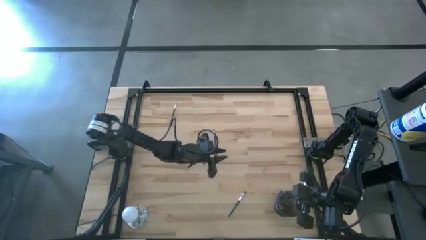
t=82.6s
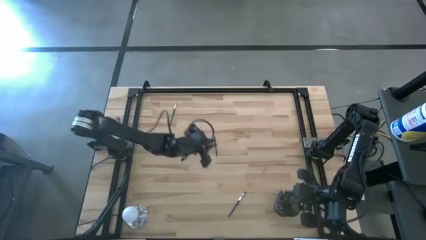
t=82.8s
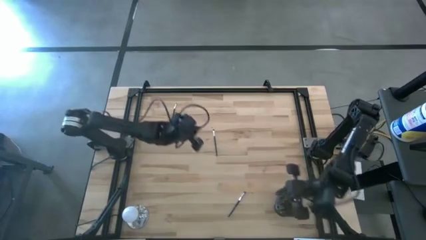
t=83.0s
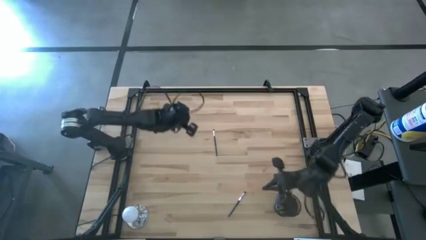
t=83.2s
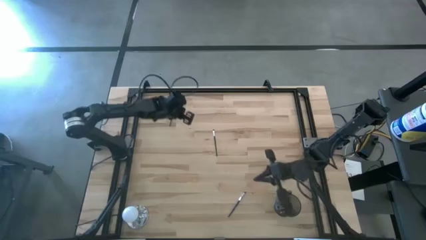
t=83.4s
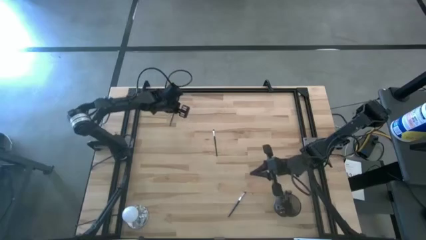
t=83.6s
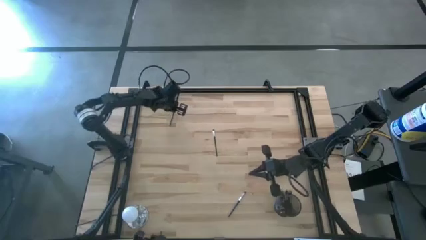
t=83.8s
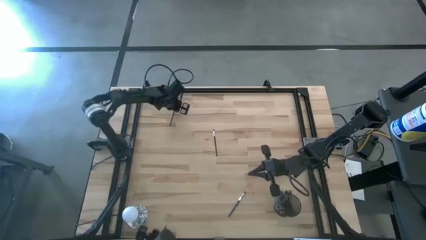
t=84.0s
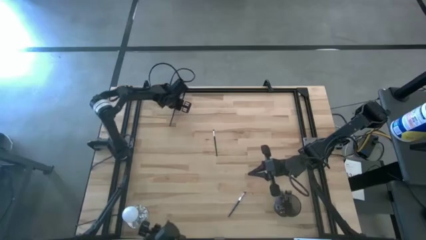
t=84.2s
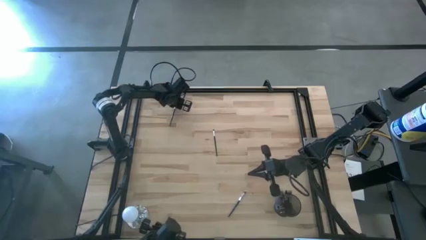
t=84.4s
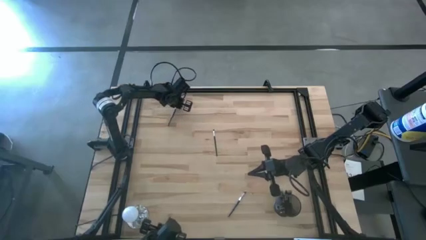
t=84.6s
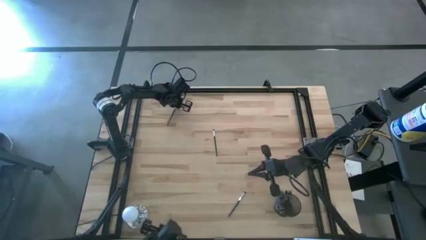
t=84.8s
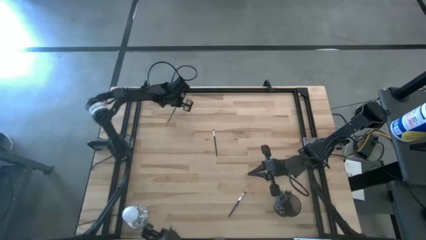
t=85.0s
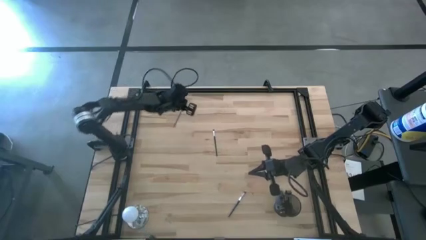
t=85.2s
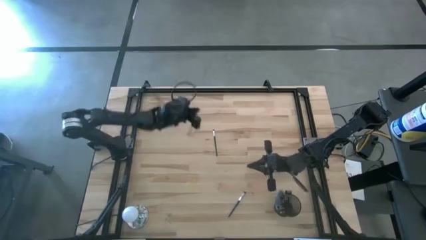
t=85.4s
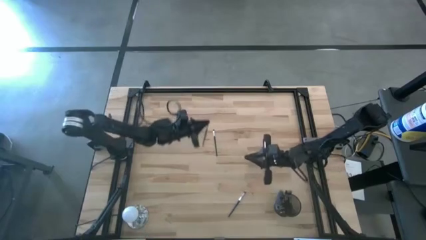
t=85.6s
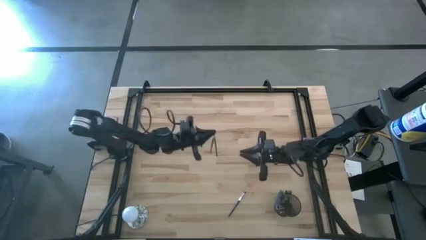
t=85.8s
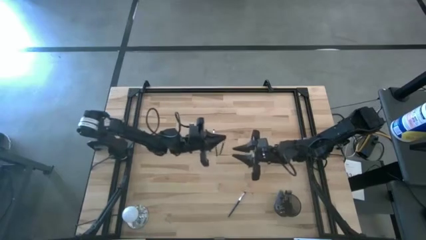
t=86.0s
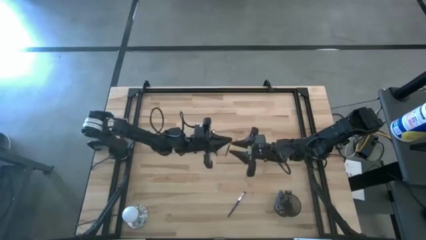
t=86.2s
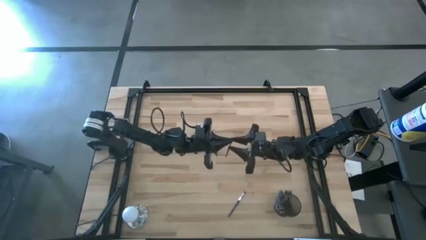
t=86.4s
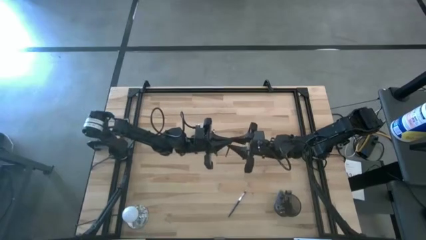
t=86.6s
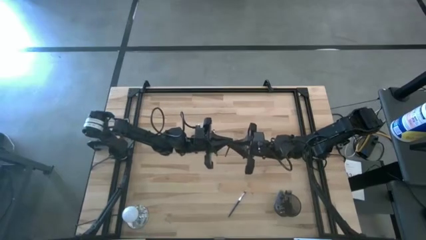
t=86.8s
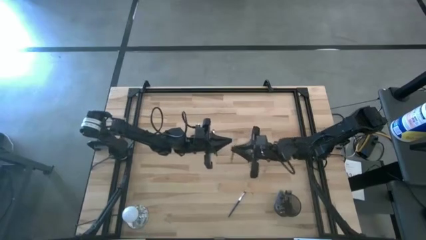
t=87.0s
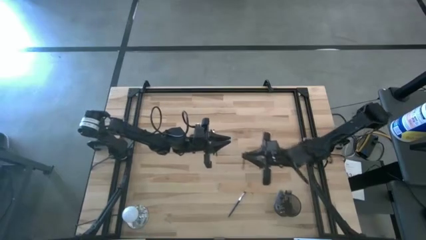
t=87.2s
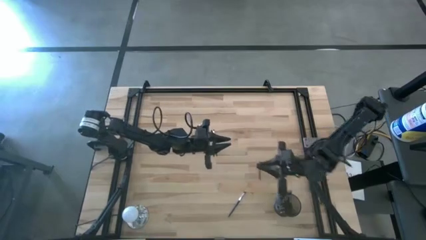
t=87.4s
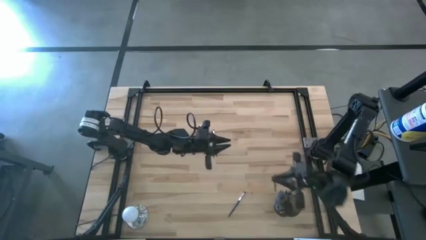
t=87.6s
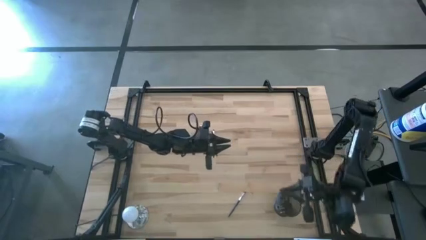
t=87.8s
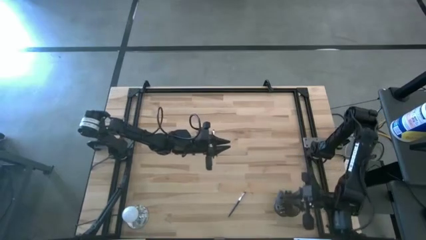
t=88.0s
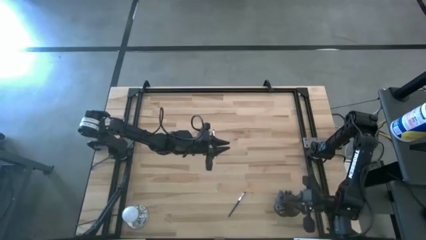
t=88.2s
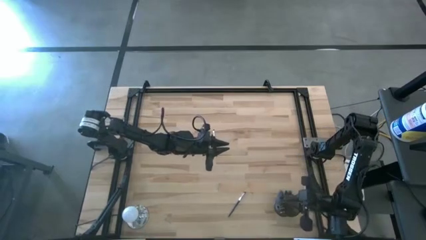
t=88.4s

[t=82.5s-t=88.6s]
Task: Sort items
Put the eyeshadow brush into the wire basket

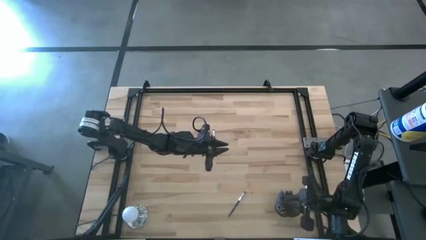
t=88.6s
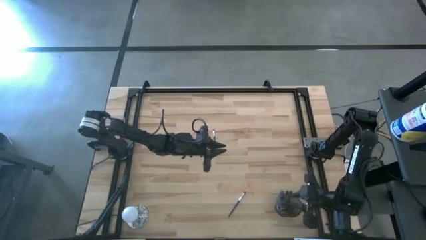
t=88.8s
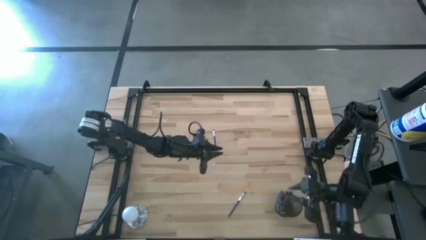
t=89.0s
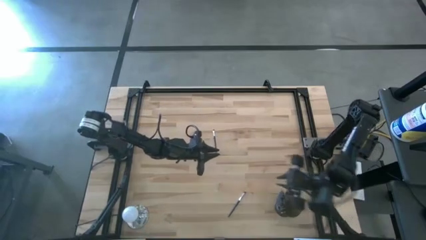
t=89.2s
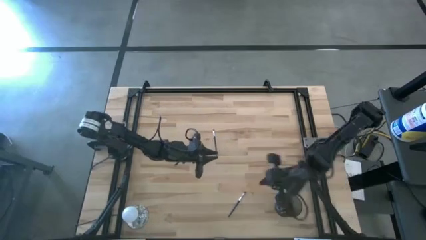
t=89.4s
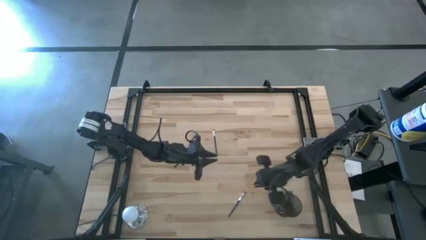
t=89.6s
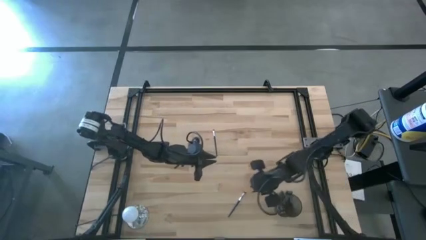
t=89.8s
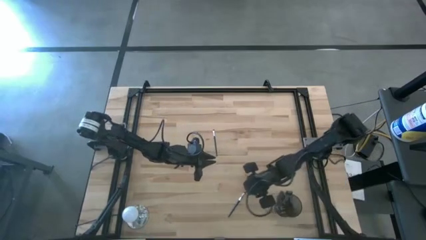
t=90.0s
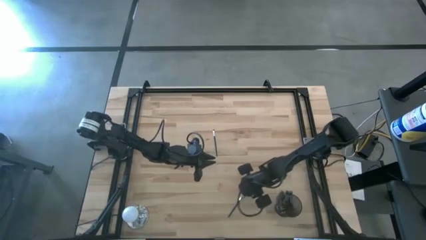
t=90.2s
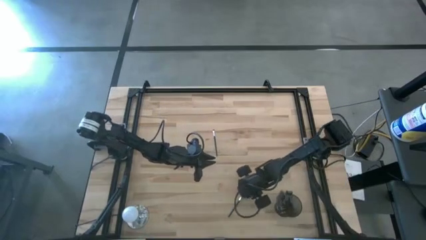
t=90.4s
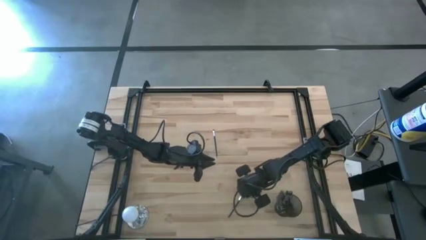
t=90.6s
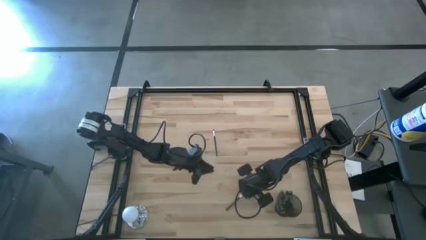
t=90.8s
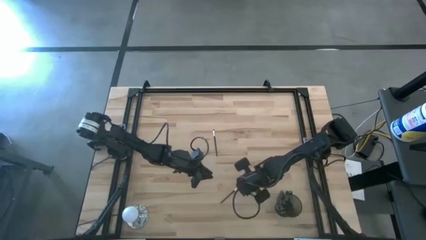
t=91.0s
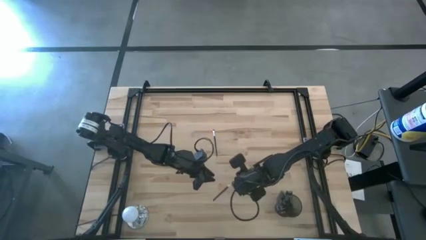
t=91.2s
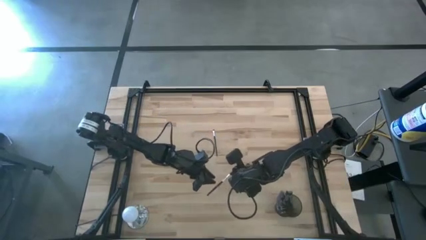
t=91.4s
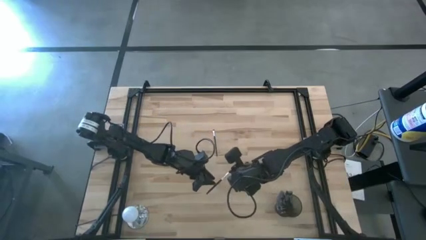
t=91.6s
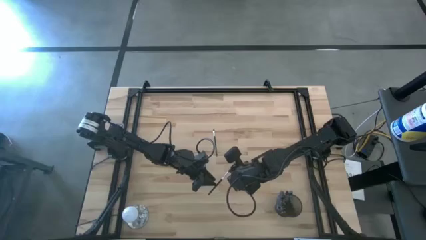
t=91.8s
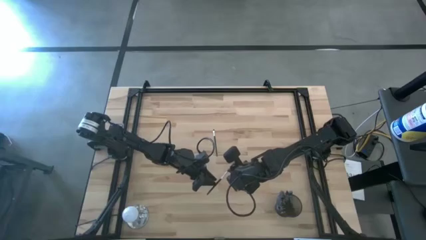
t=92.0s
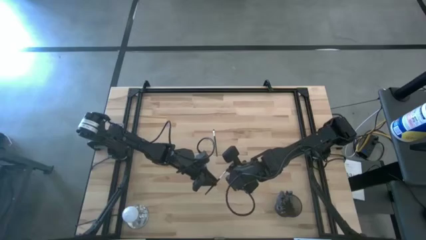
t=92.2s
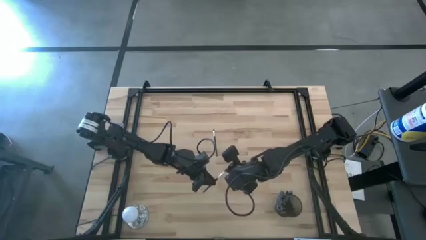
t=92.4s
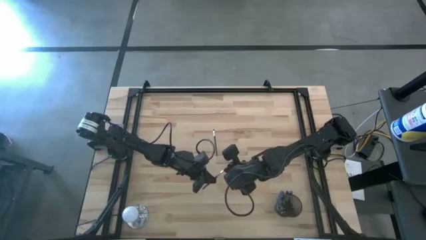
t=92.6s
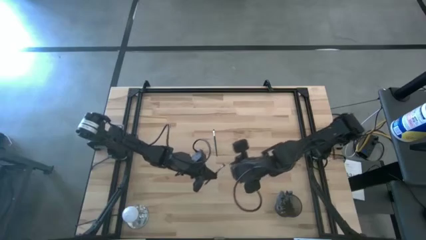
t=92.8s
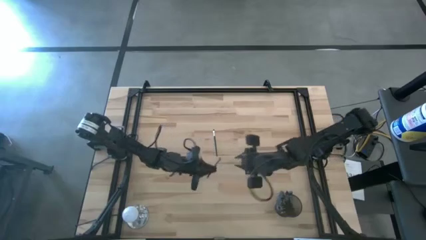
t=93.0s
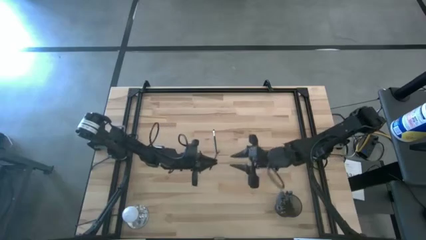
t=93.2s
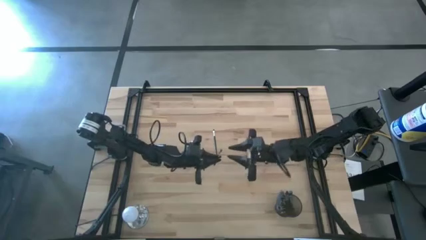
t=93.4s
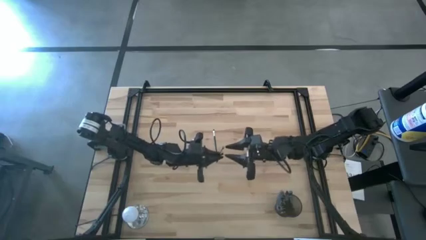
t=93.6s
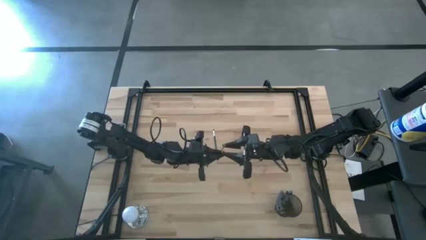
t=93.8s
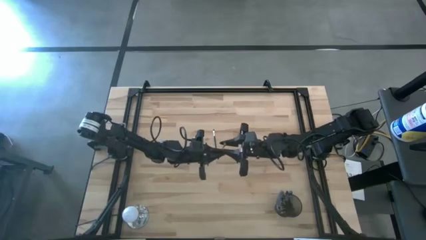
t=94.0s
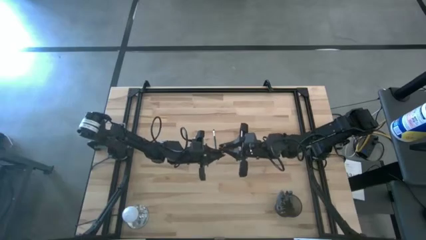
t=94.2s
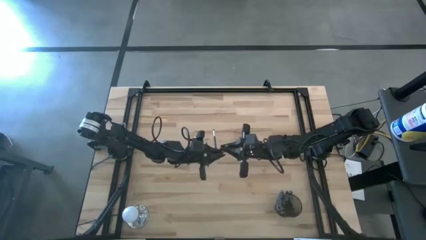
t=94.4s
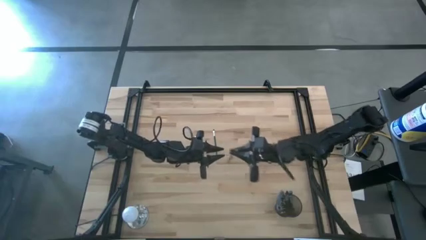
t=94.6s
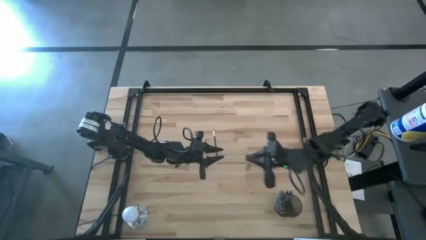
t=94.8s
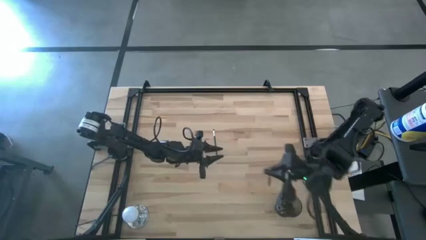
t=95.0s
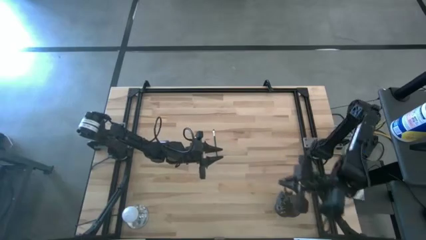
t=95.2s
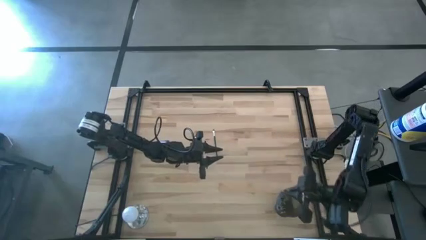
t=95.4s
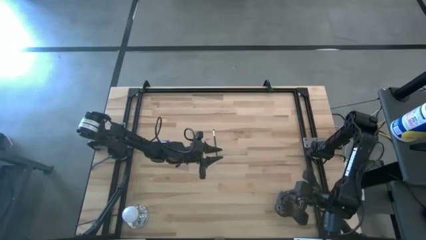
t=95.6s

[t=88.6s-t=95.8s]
Put the eyeshadow brush into the wire basket

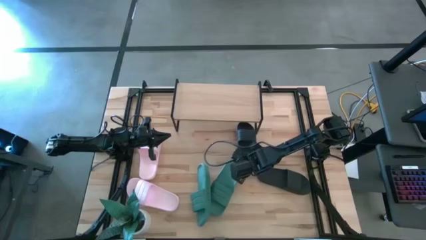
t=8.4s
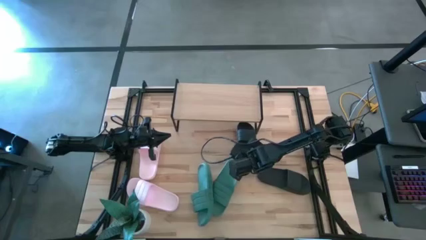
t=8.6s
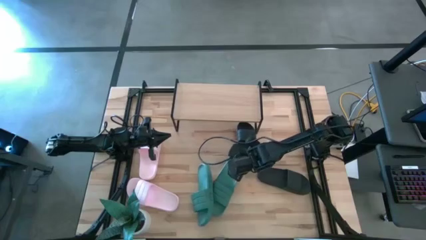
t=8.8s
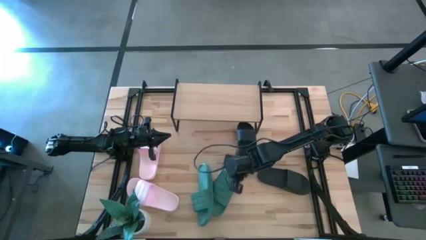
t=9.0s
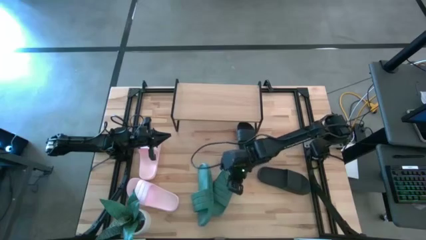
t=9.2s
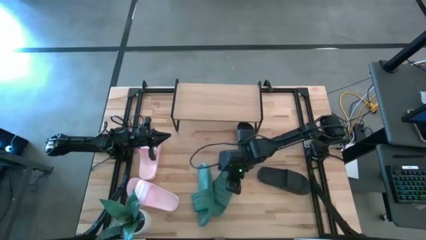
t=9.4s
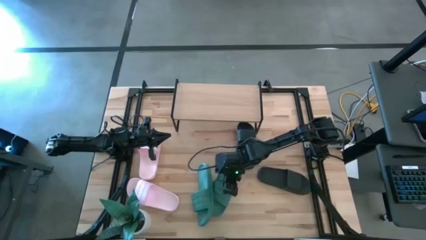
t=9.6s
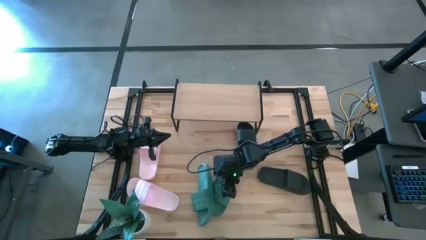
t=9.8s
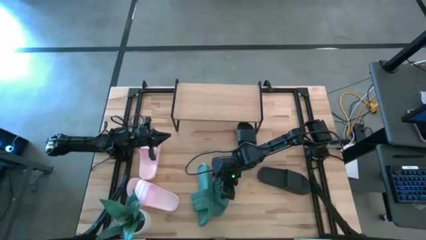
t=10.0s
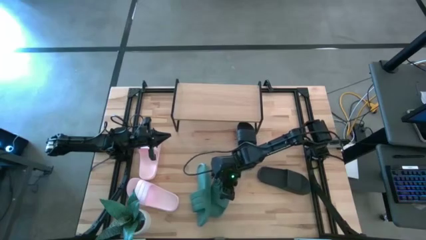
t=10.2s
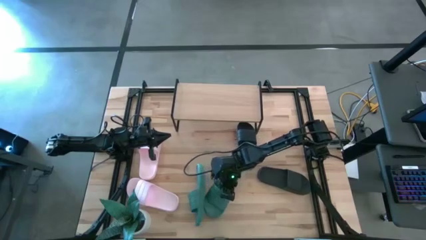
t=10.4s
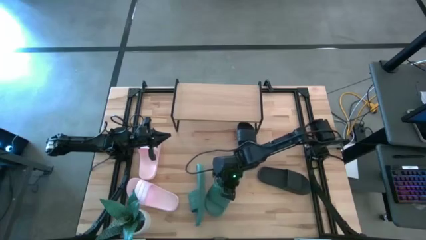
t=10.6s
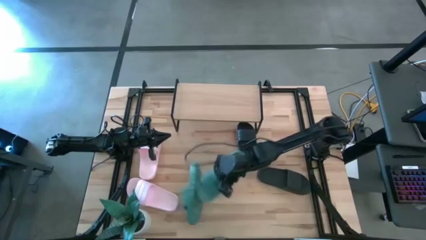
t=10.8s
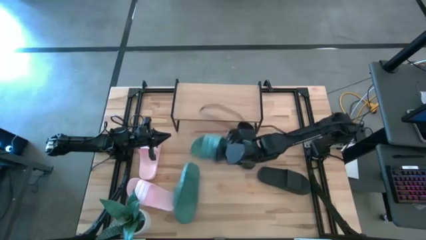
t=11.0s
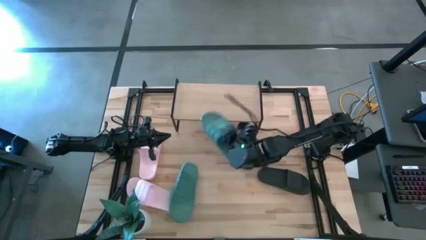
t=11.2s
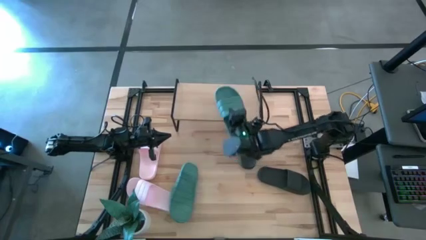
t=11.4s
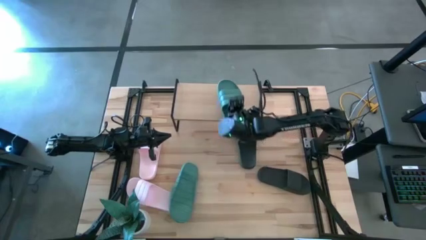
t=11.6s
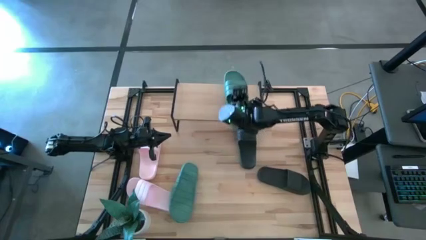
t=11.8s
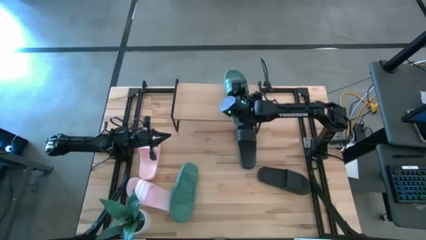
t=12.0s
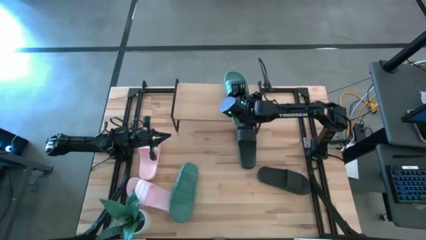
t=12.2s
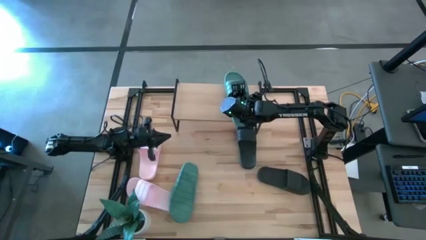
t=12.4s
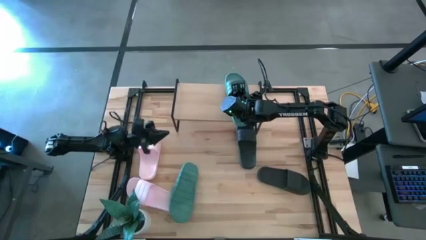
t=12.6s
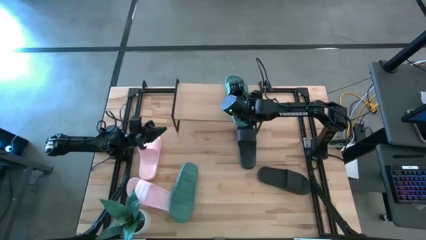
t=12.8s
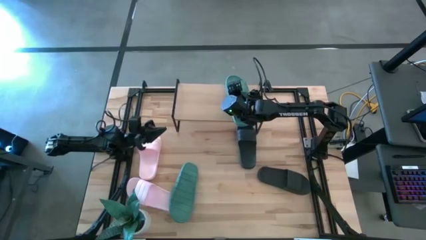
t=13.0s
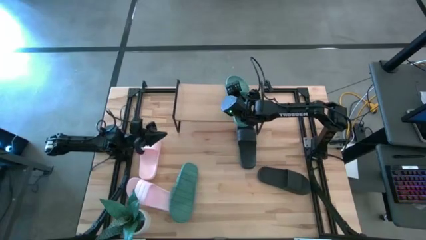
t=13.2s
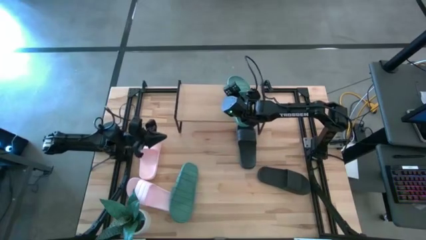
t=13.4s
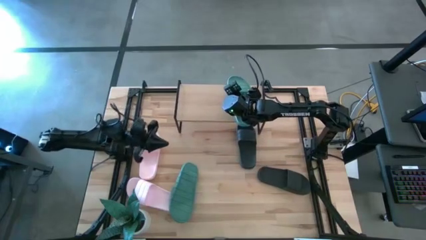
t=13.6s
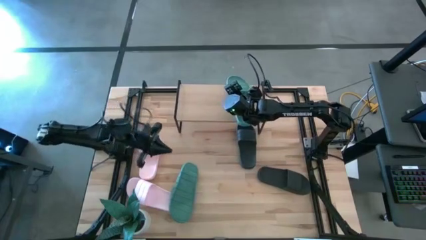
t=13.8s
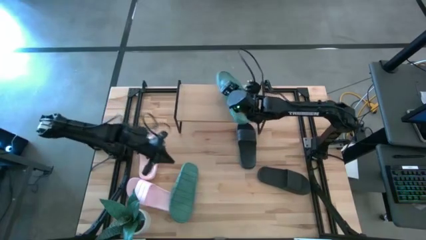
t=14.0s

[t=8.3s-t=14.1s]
Task: Pick and place slides into the shelf
Put the right green slides on the shelf
